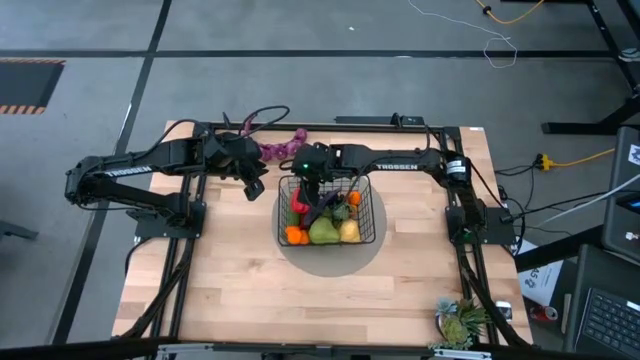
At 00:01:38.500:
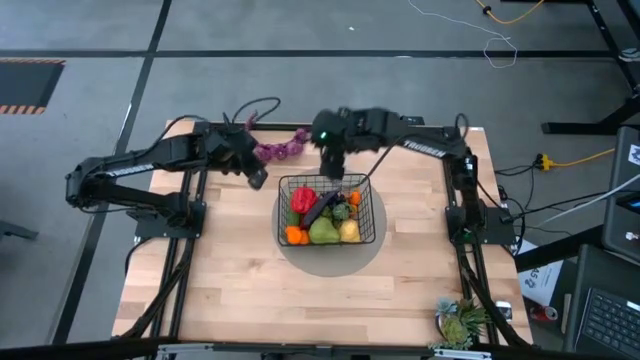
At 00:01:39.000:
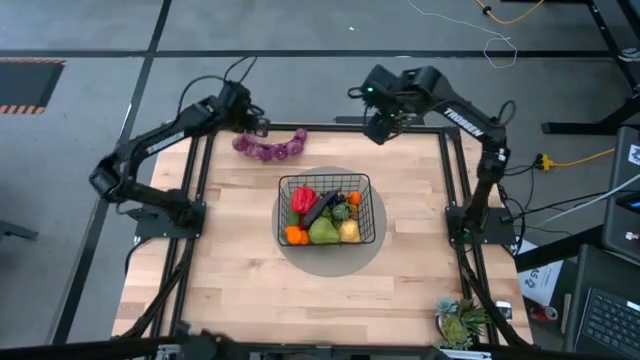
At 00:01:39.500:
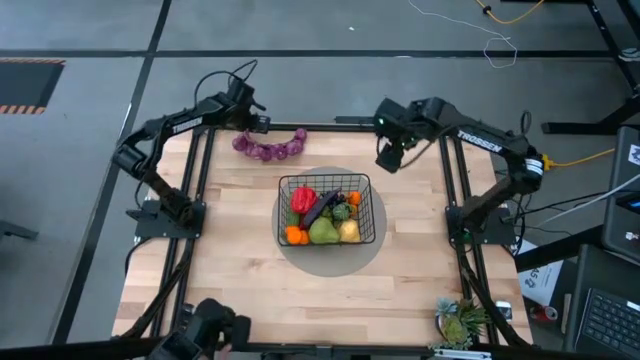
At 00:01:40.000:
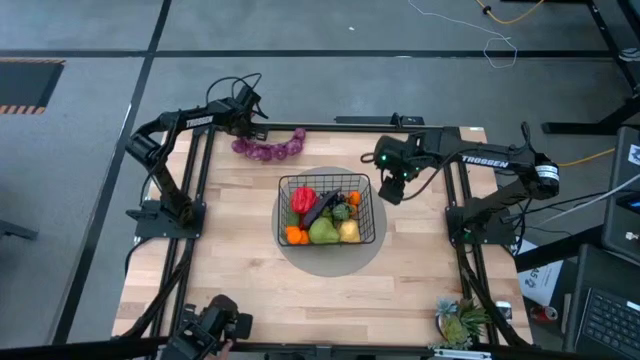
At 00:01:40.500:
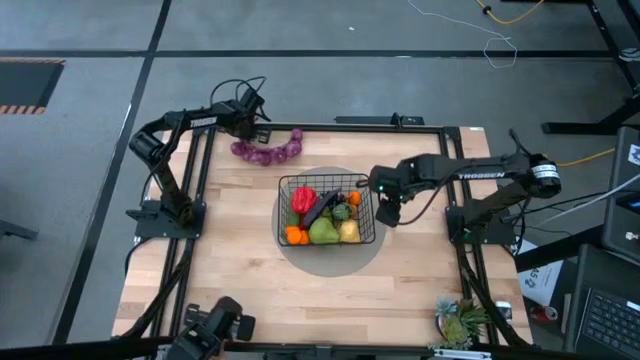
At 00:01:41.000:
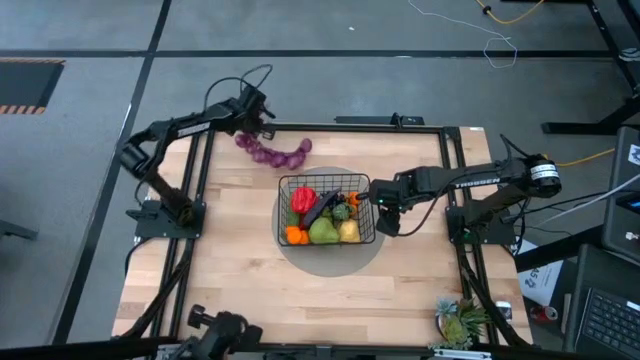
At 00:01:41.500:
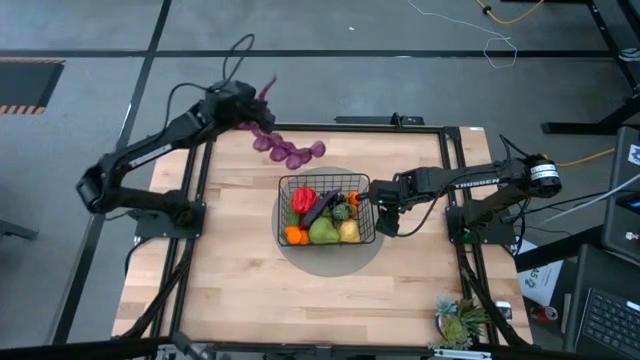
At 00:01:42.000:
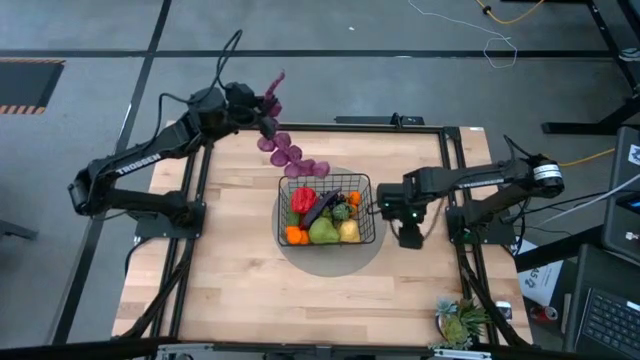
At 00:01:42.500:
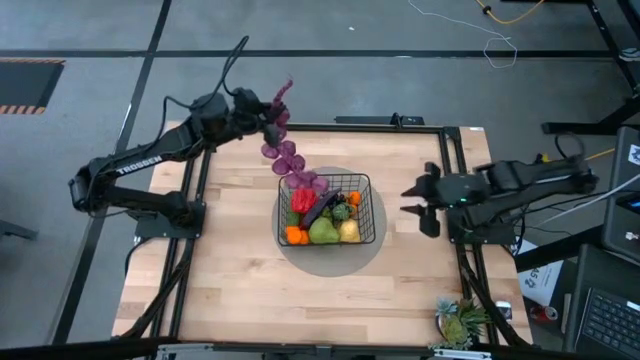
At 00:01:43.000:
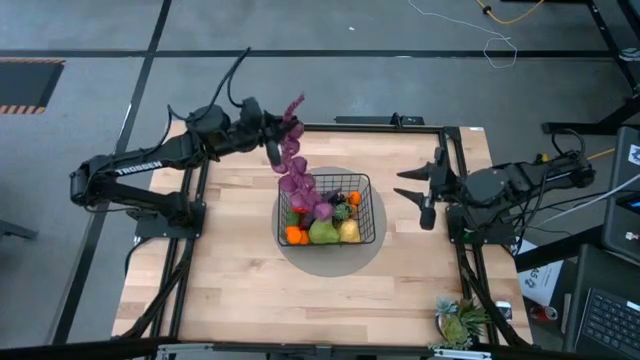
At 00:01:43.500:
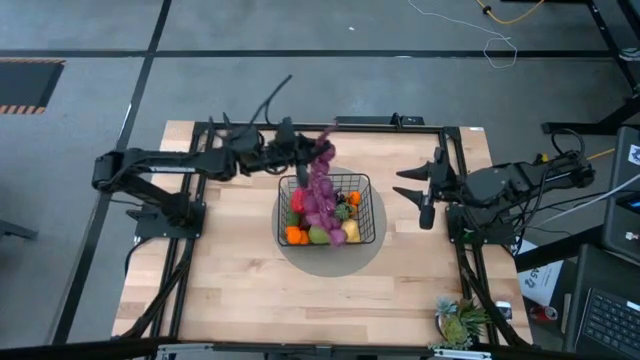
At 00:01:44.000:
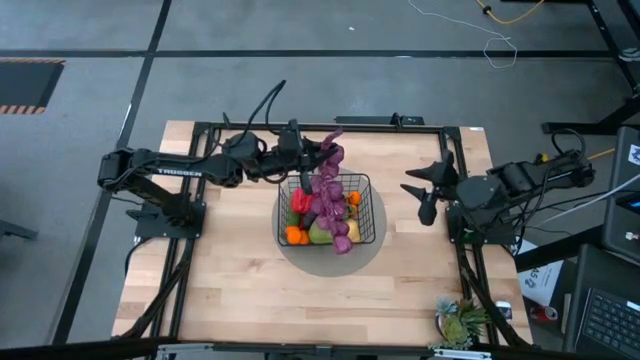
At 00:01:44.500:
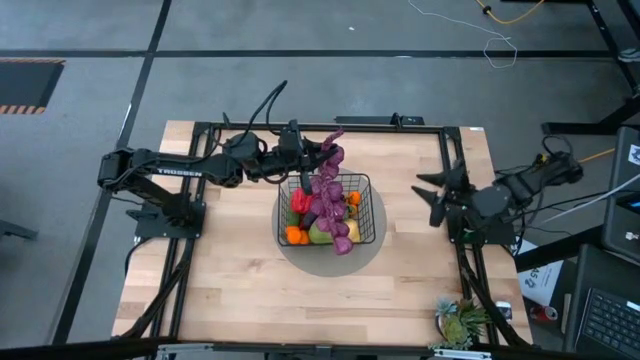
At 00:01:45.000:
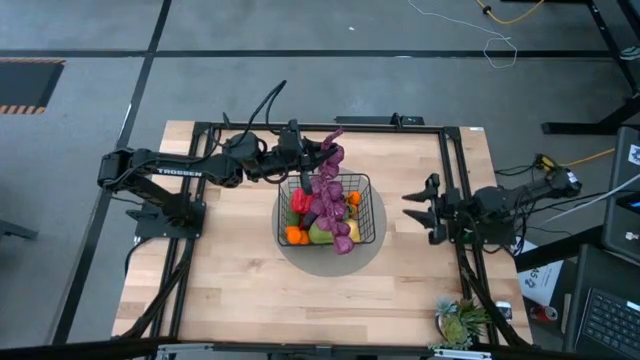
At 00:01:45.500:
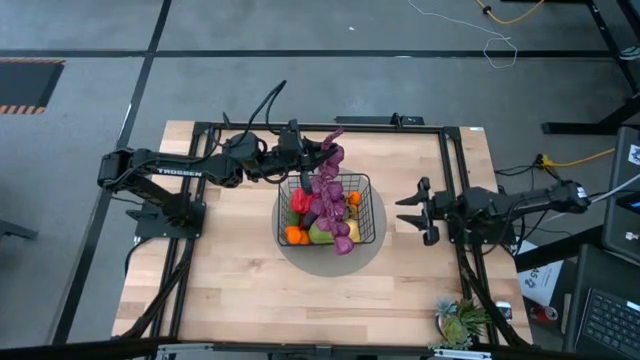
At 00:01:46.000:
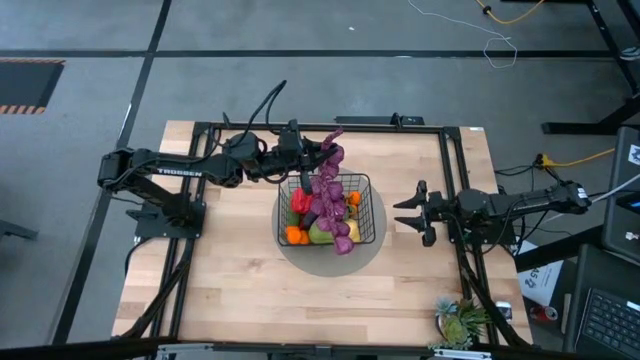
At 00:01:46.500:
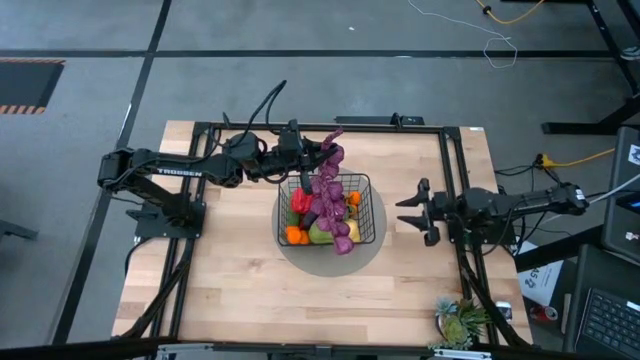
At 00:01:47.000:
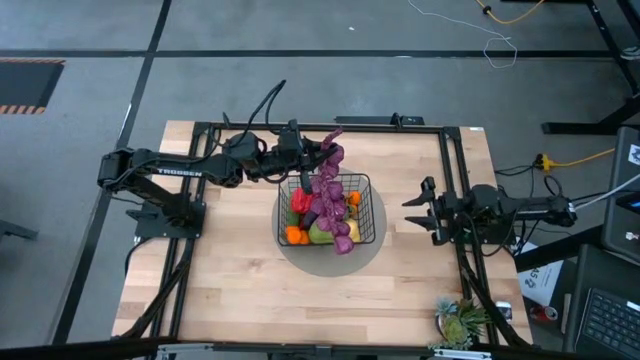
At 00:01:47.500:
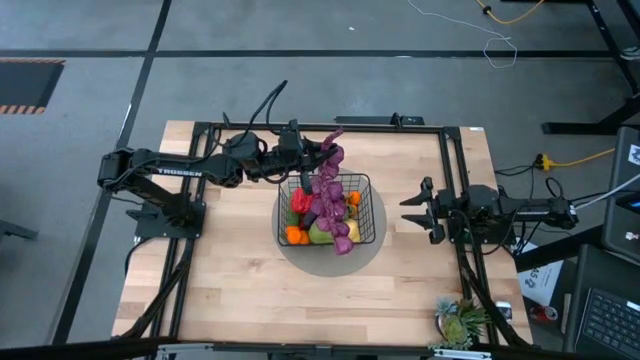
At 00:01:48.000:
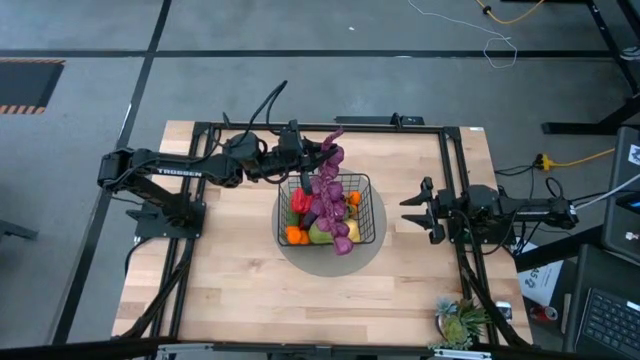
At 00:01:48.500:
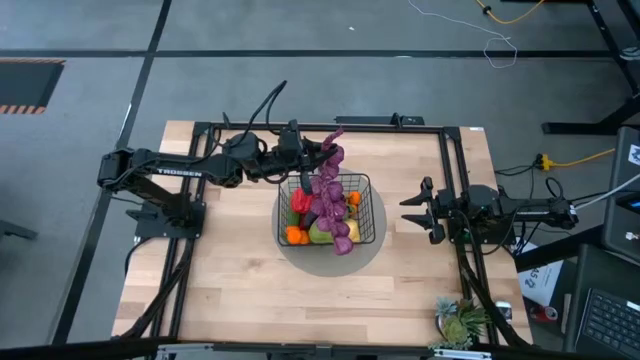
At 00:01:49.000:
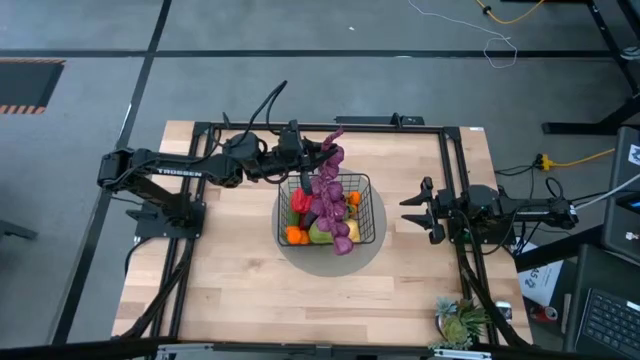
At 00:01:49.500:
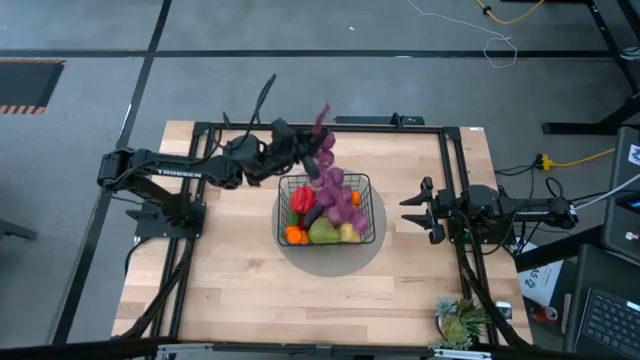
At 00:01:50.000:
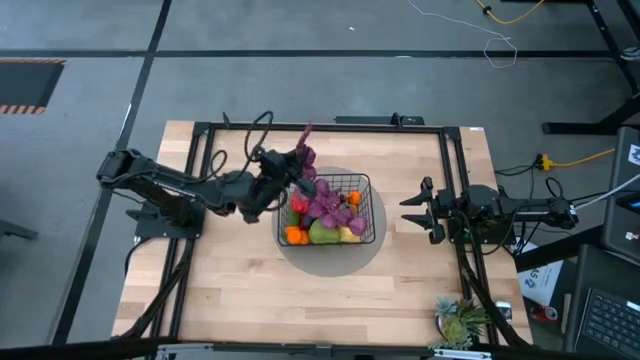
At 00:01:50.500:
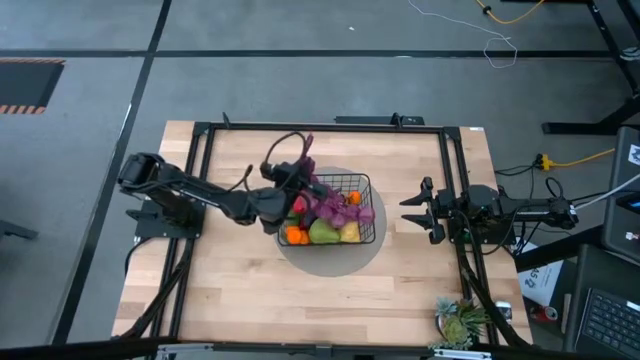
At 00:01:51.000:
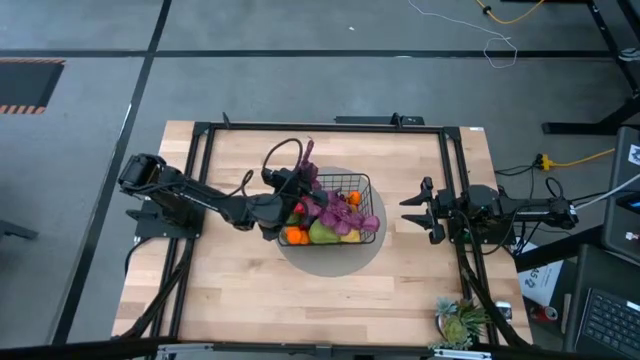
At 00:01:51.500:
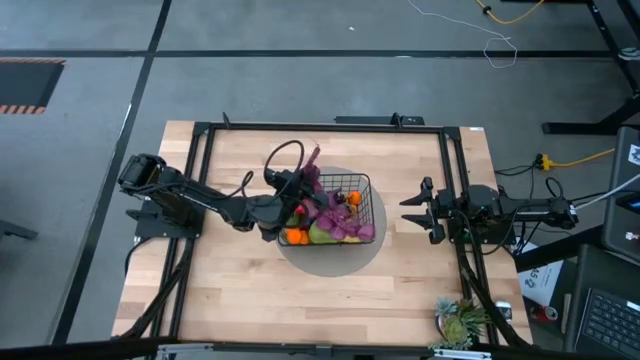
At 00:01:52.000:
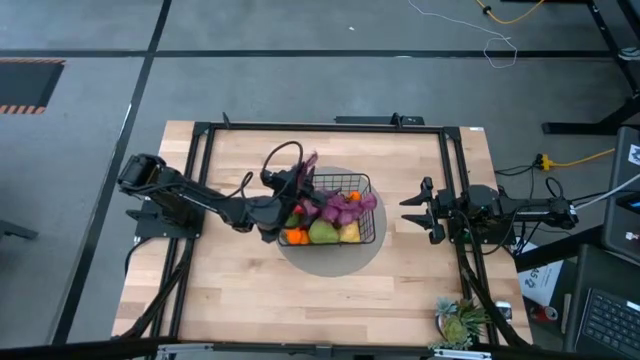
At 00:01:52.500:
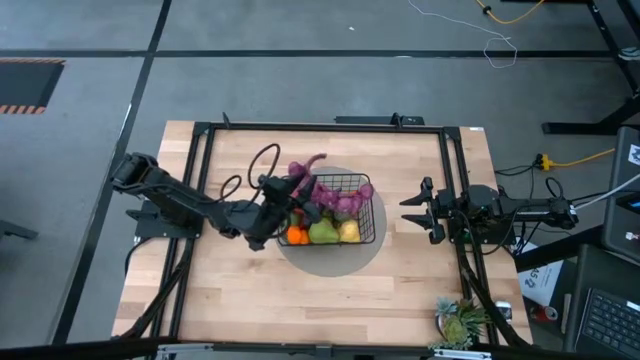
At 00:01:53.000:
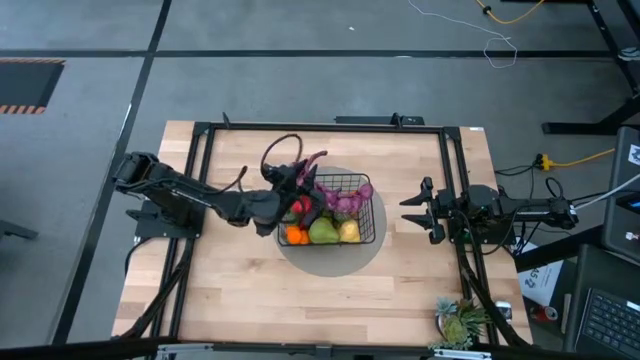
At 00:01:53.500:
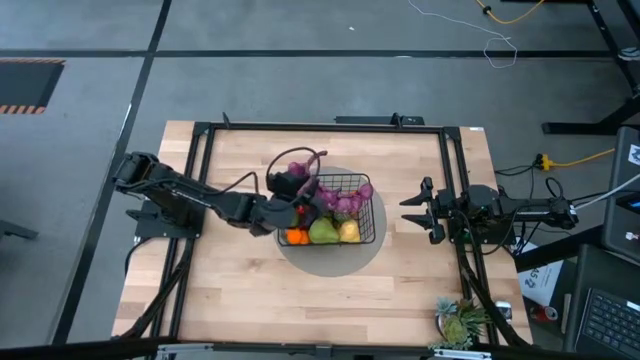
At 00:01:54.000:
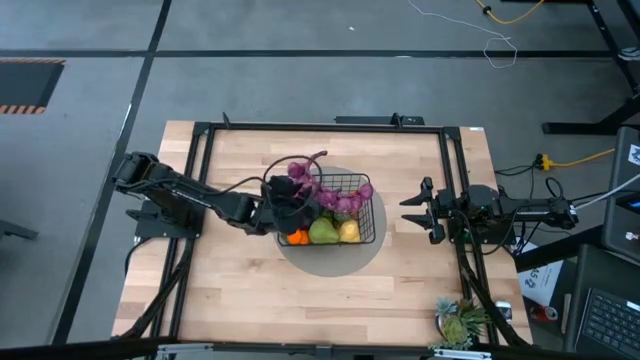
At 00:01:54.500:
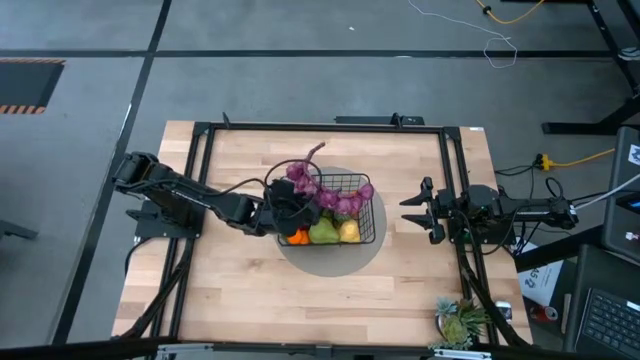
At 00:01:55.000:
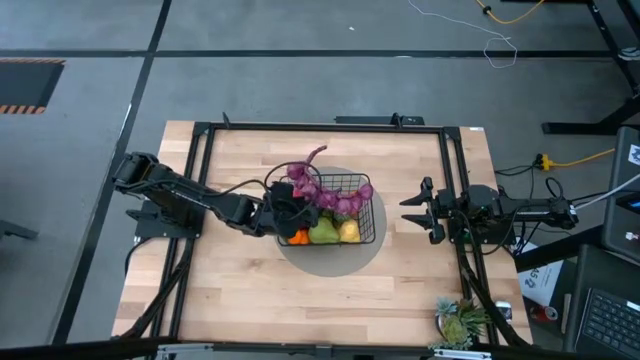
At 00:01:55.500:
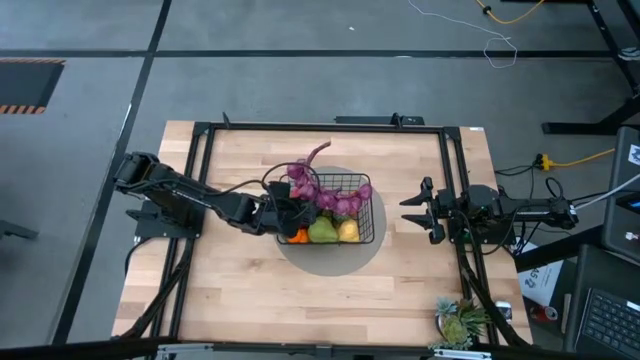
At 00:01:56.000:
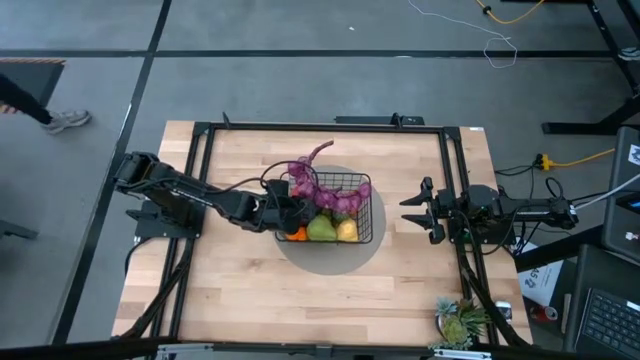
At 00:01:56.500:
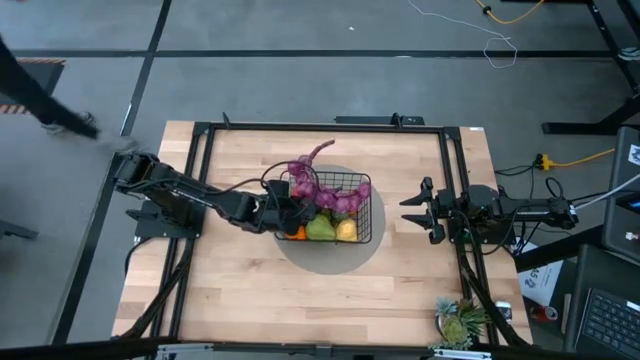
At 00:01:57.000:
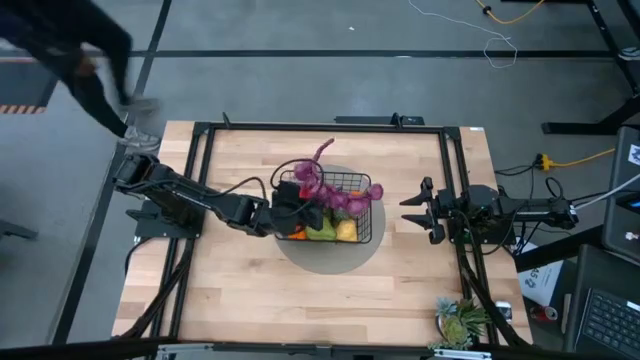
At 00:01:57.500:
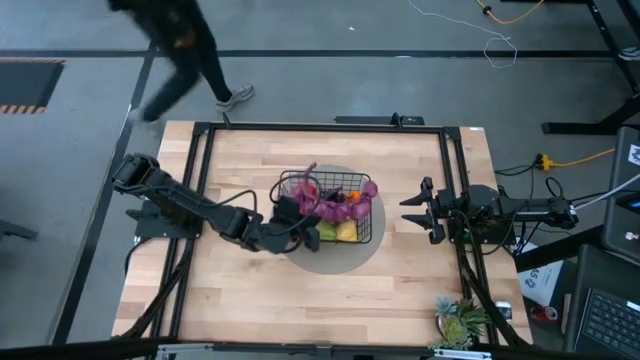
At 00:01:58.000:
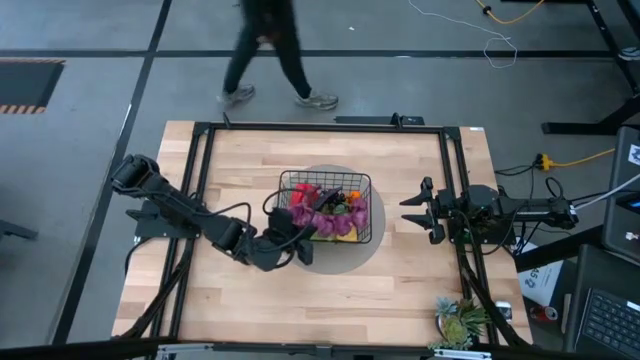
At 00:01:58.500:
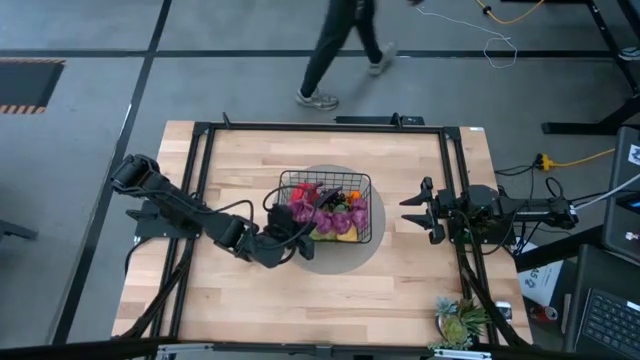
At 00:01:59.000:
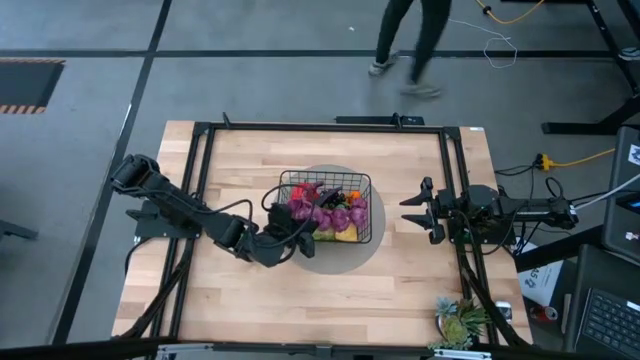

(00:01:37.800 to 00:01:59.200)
Task: Build produce basket
Put the purple garlic into the black wire basket
